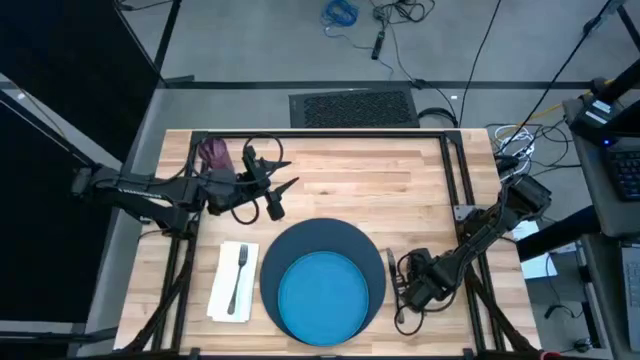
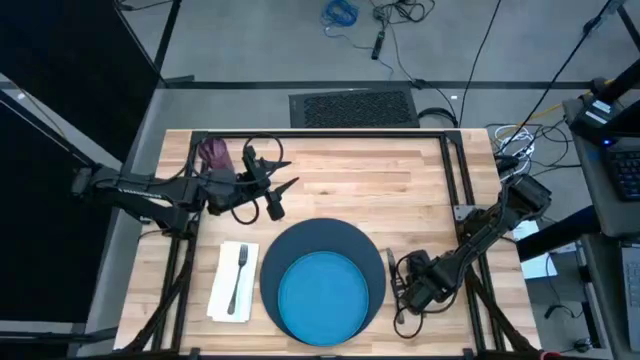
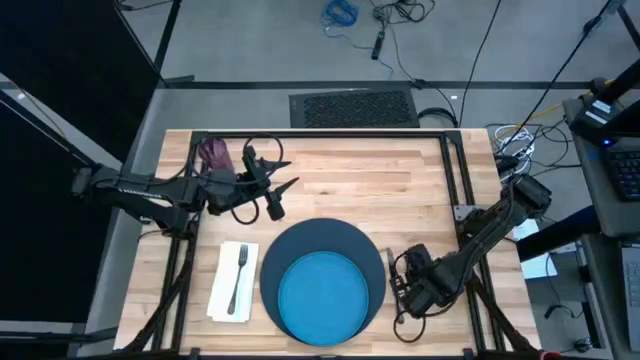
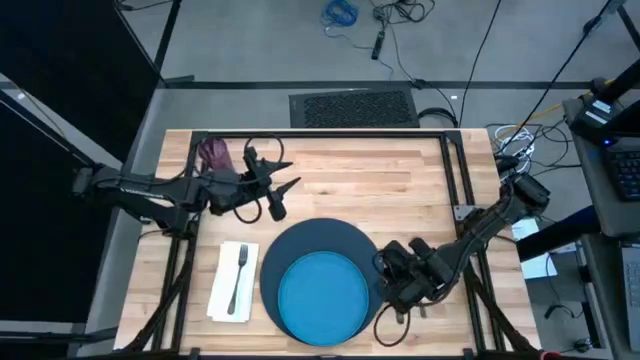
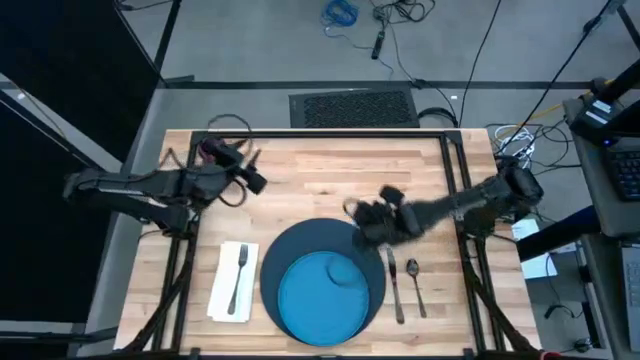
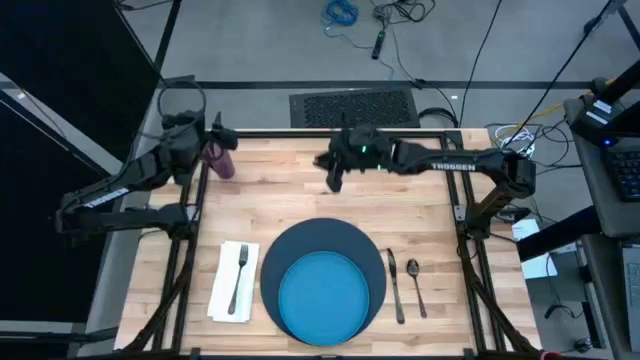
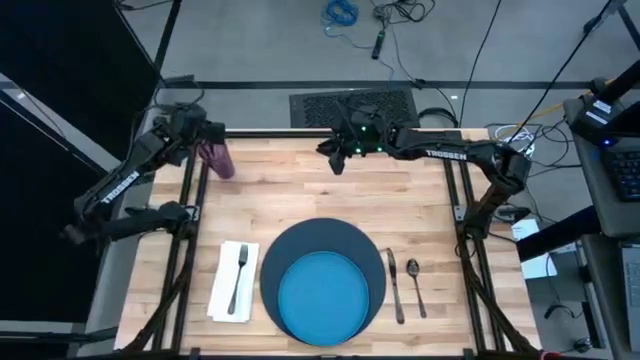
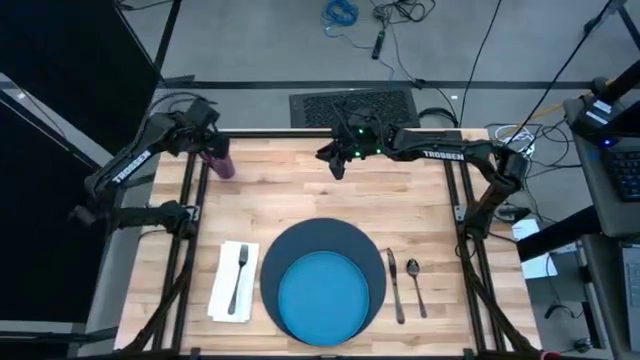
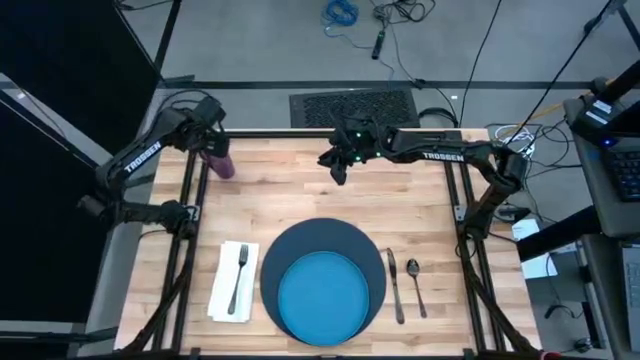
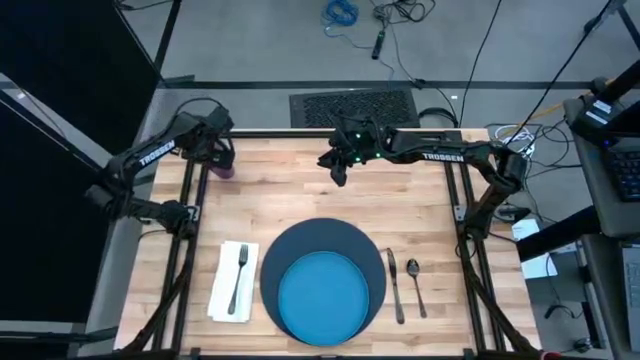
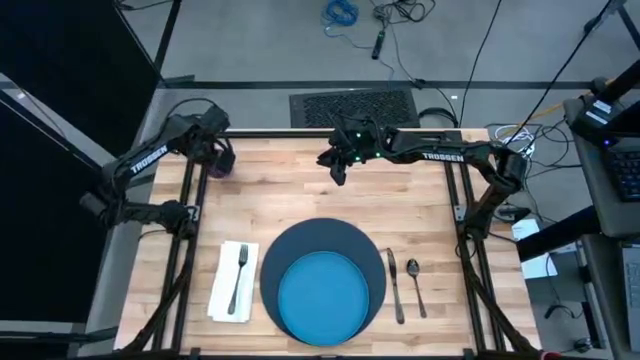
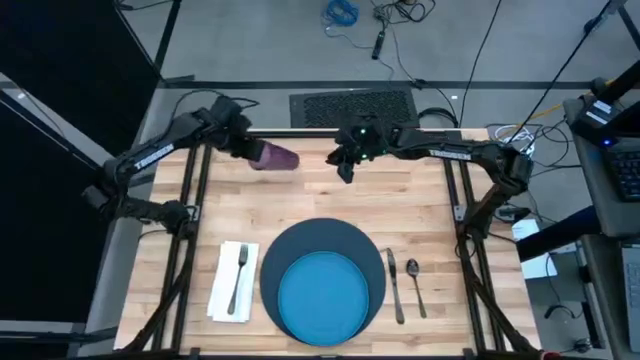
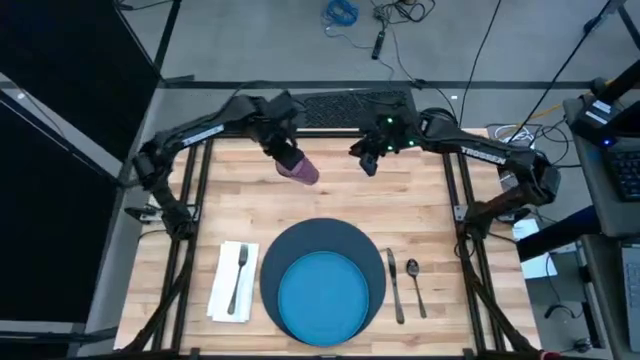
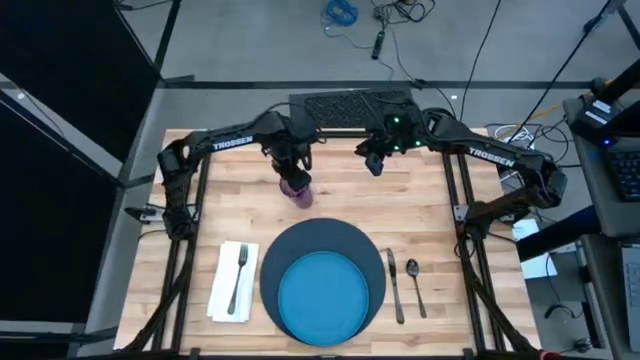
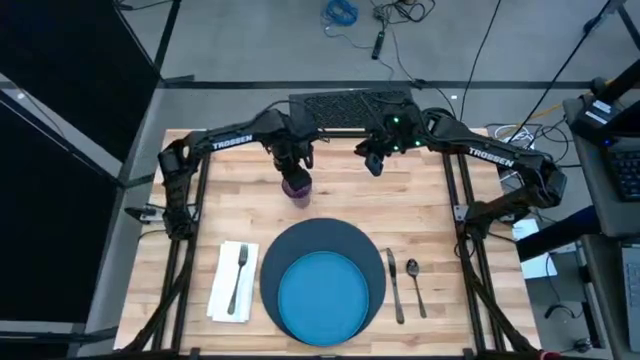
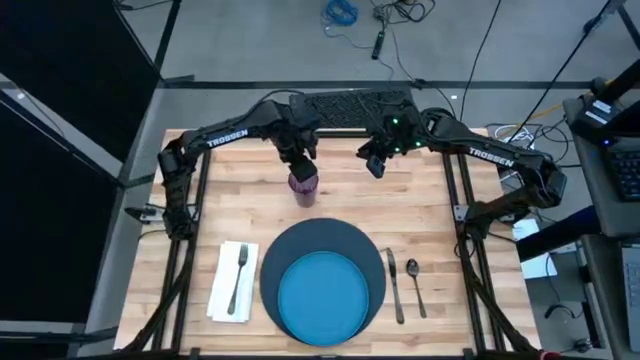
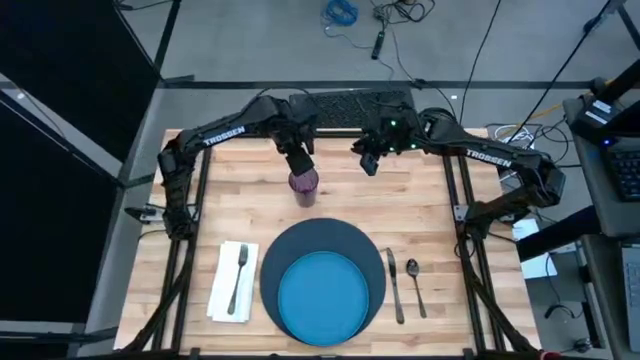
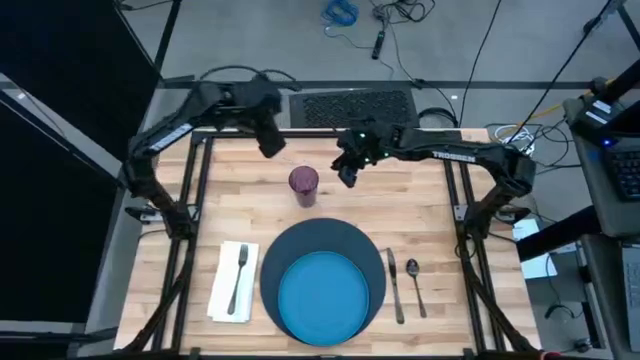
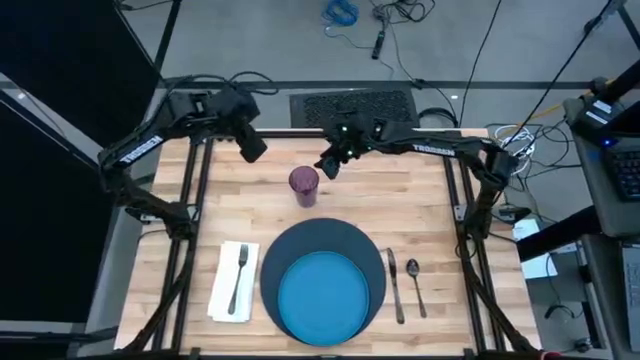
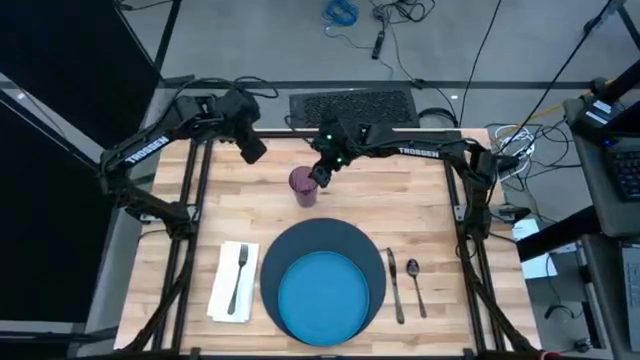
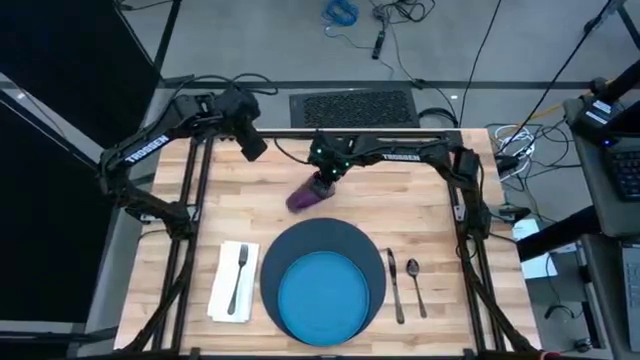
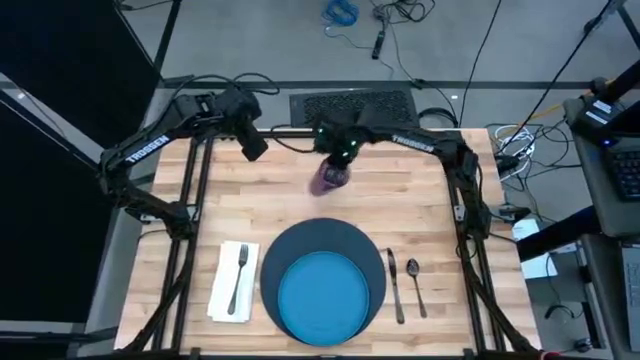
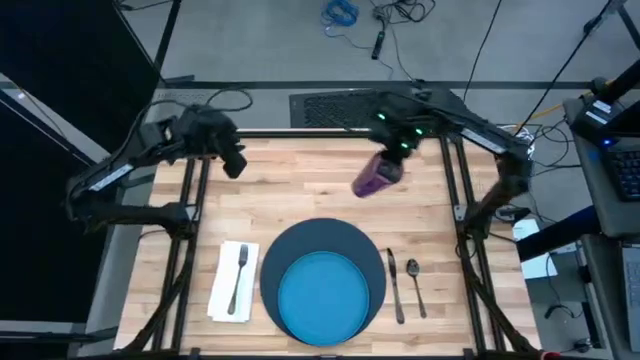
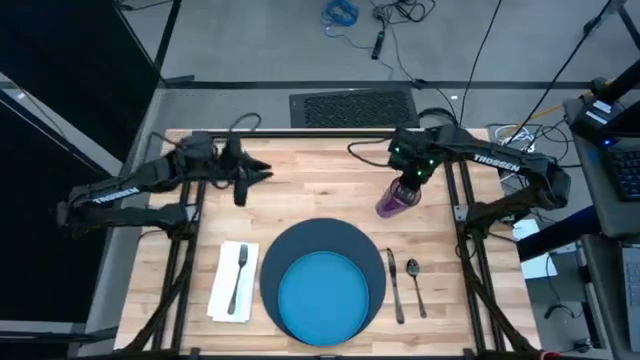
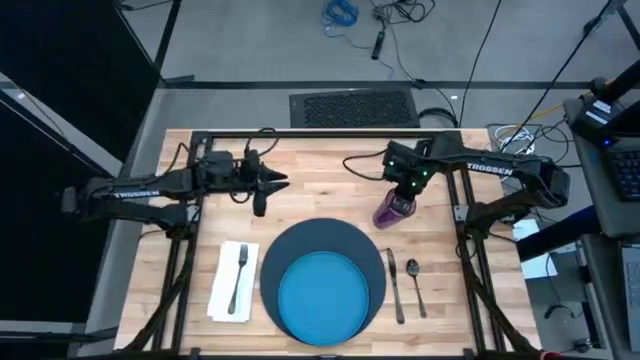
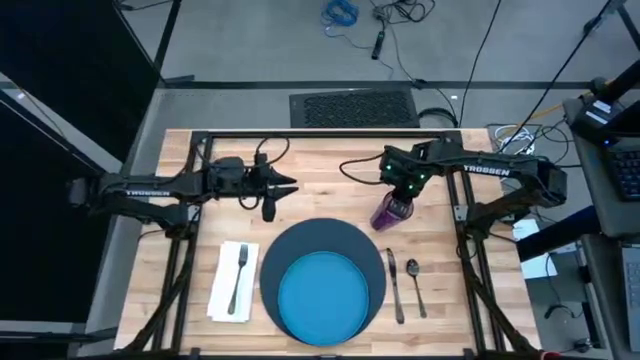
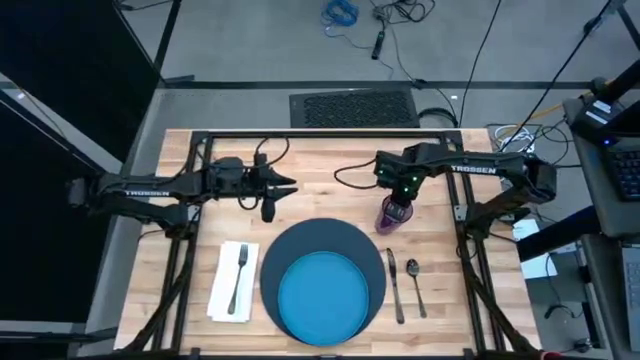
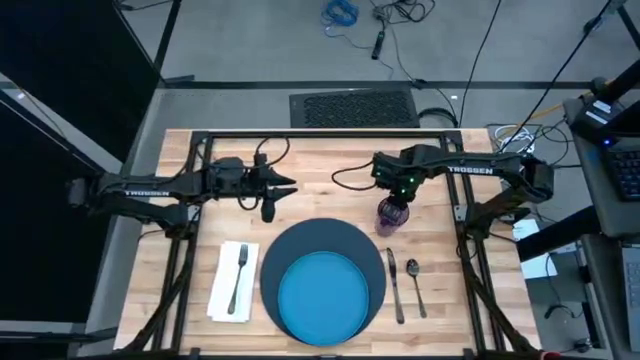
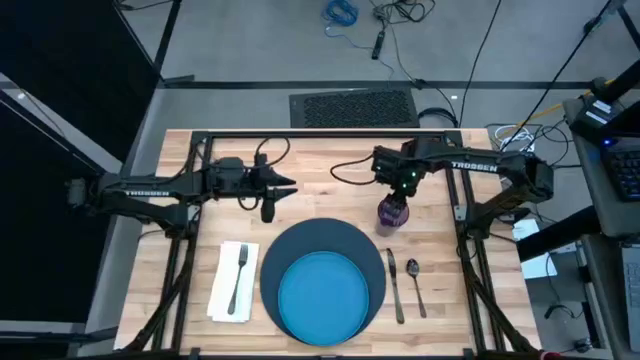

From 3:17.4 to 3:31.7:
Task: Set table place
Put the cup on the top right side of the table mat

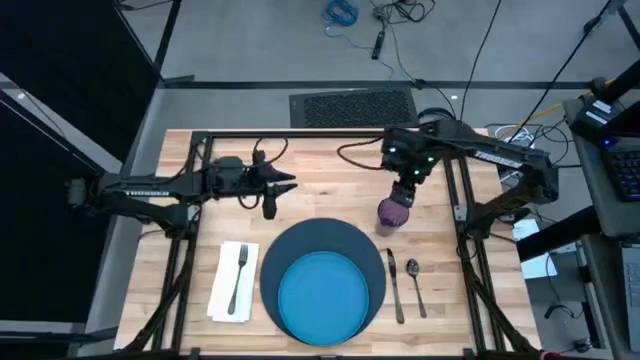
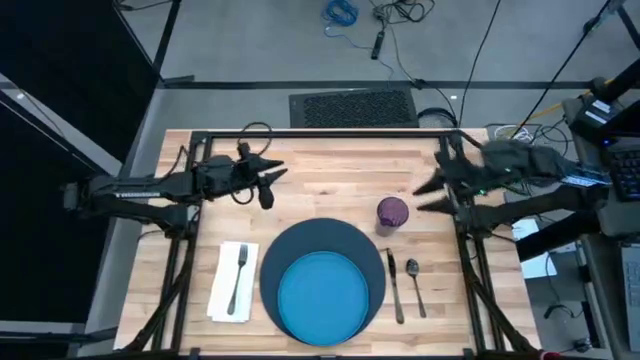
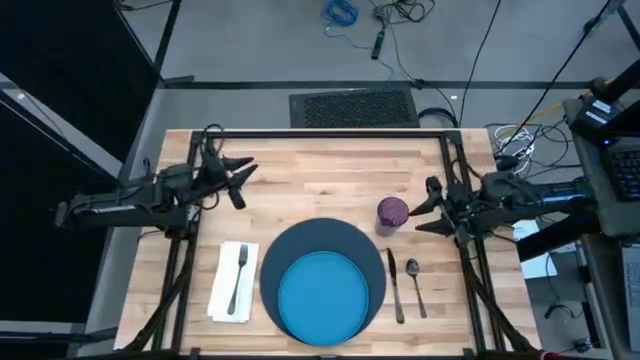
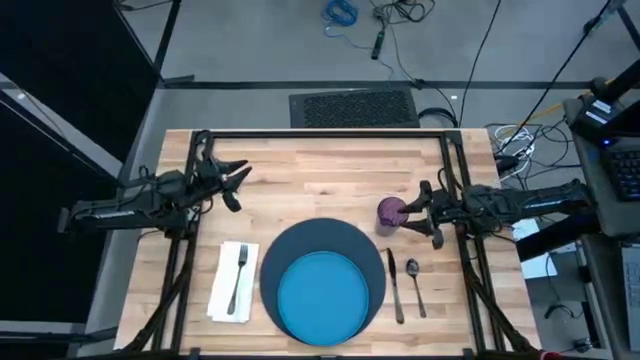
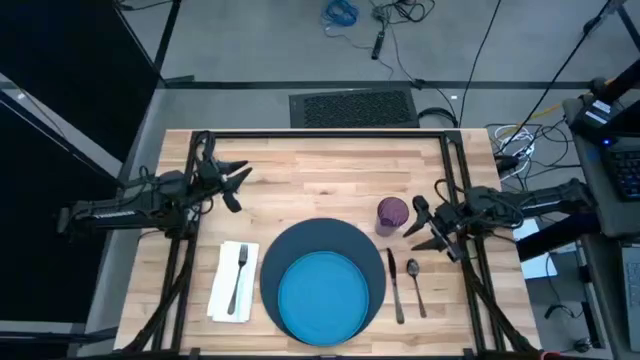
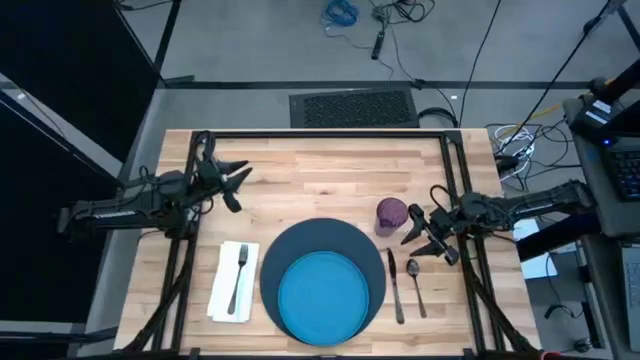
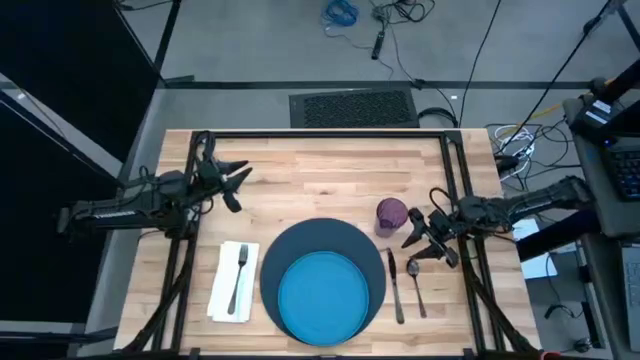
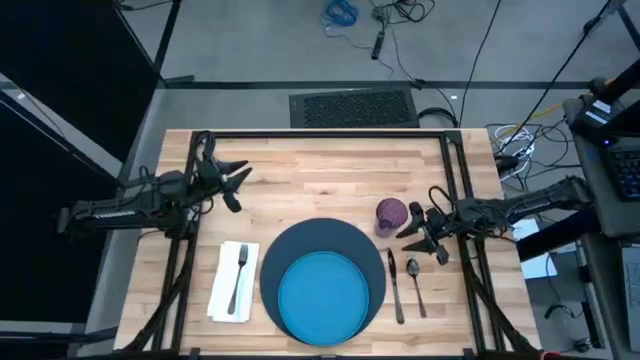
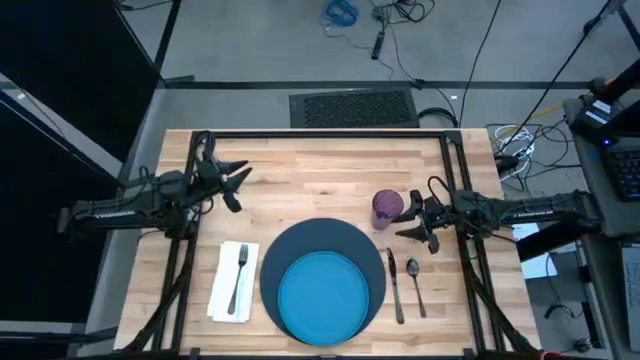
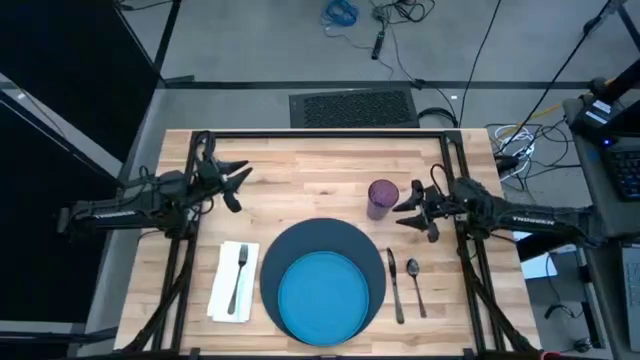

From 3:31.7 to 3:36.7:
Adjust the cup on the top right side of the table mat

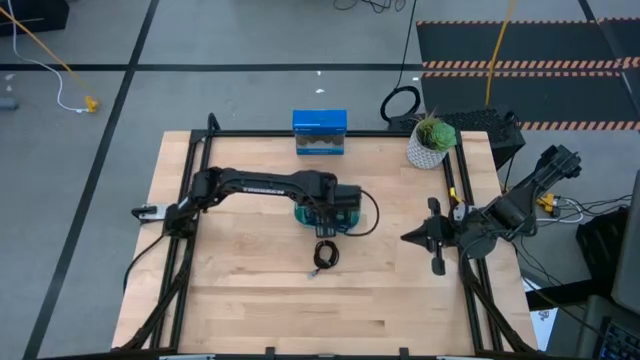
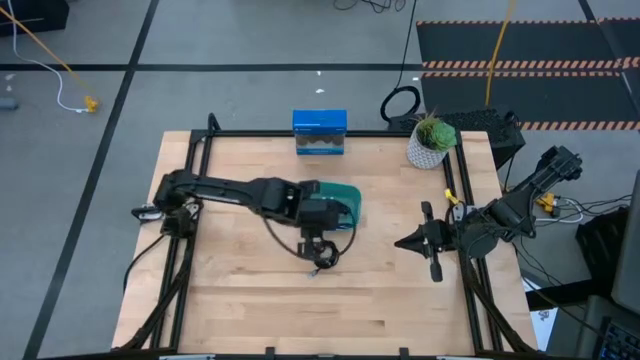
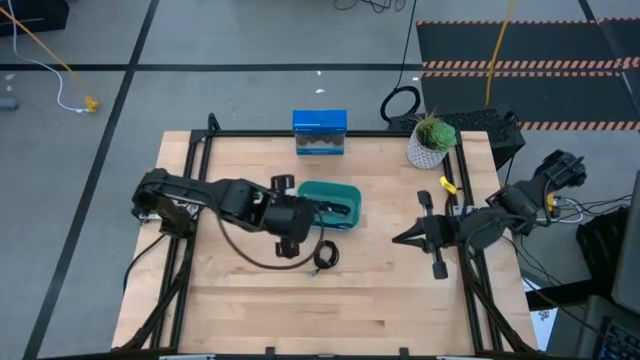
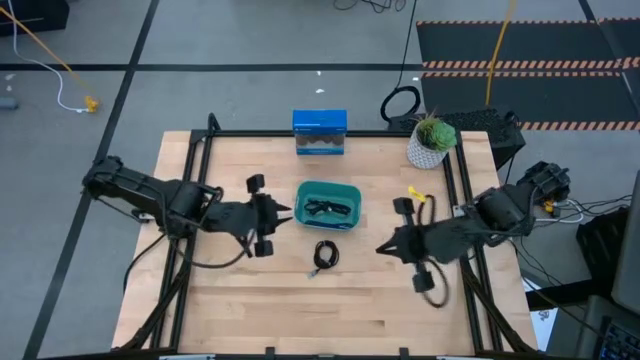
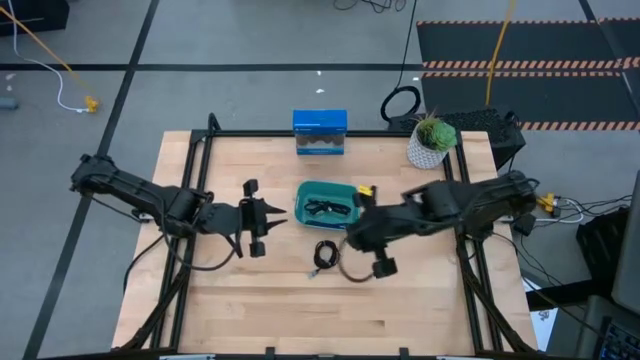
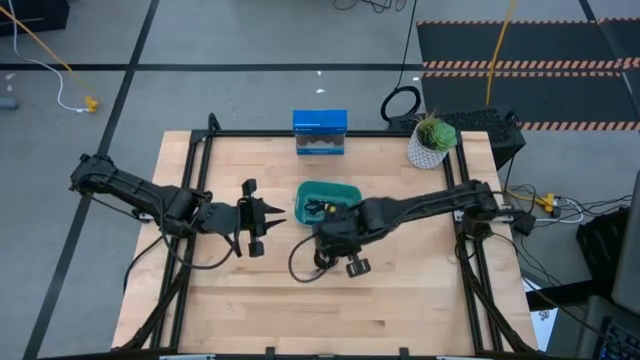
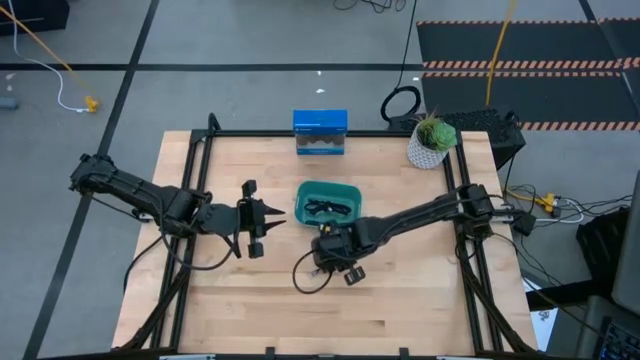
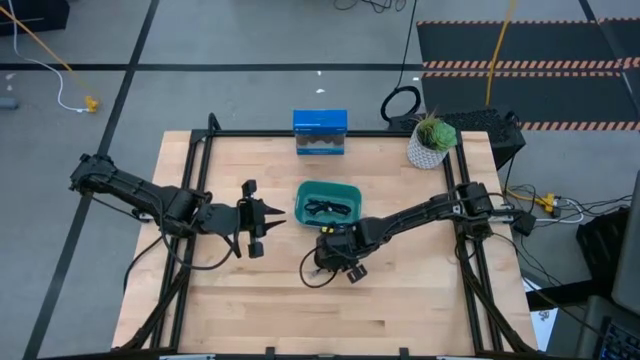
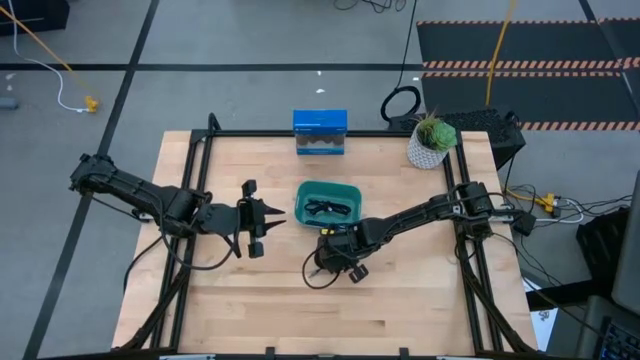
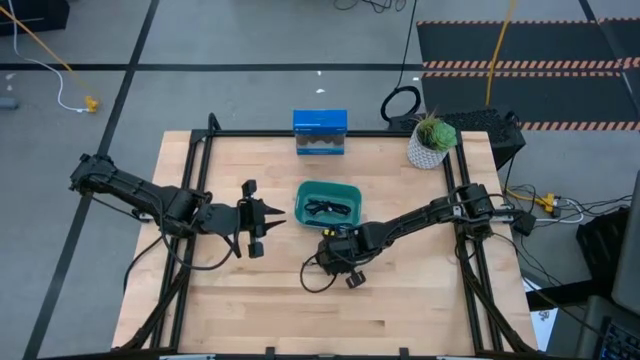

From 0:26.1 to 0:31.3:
Task: Pick and place USB-C Cables
Put the black charger cable into the green container
